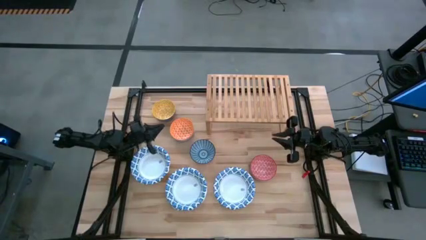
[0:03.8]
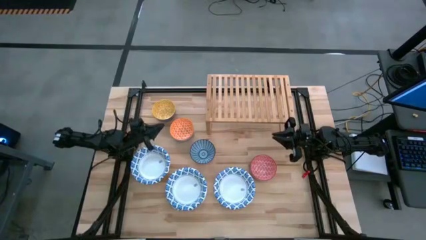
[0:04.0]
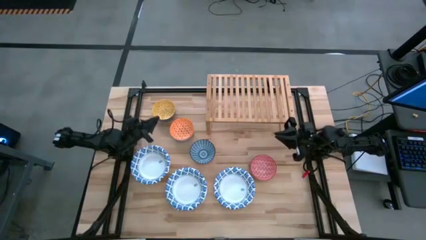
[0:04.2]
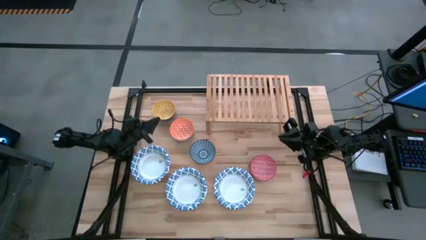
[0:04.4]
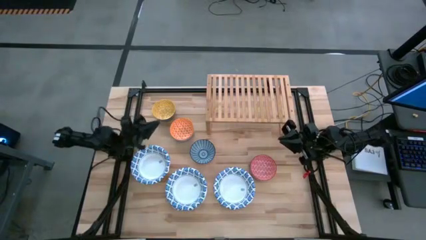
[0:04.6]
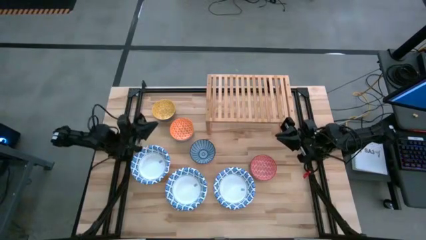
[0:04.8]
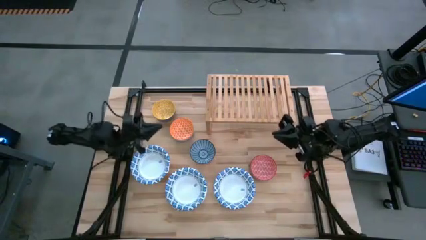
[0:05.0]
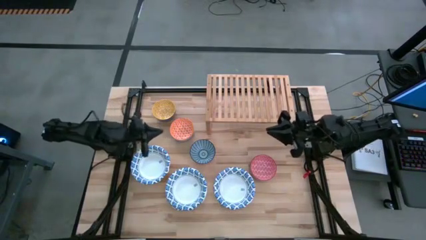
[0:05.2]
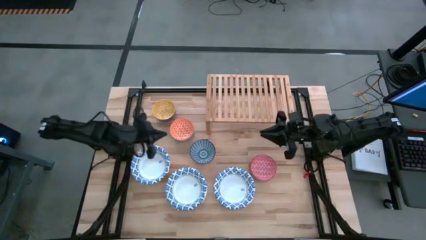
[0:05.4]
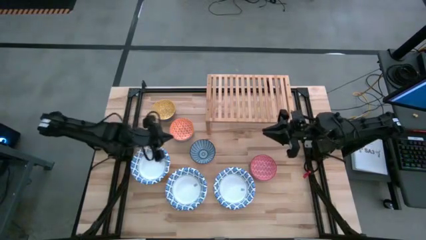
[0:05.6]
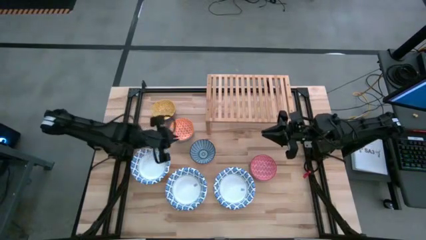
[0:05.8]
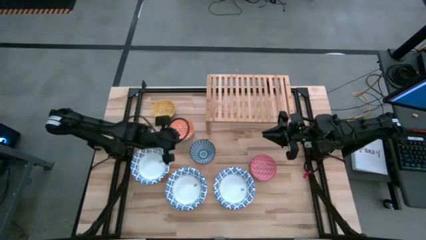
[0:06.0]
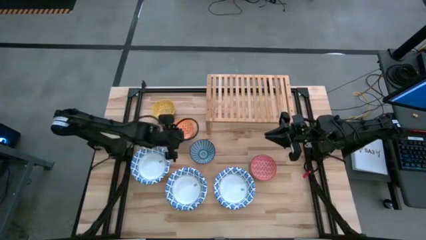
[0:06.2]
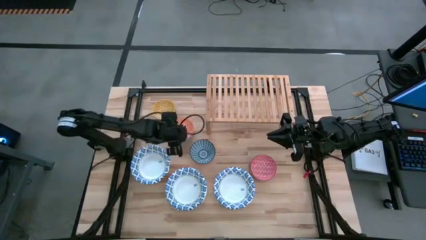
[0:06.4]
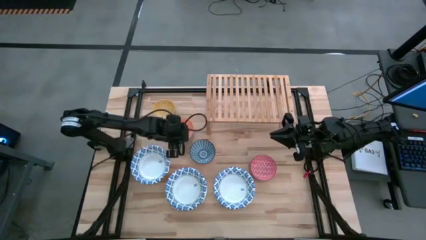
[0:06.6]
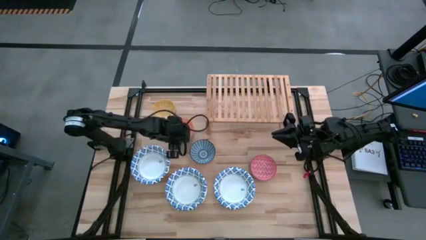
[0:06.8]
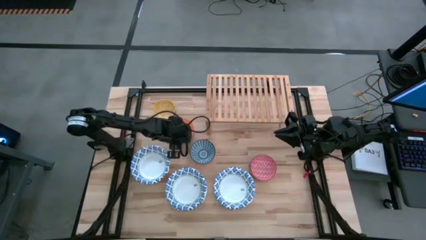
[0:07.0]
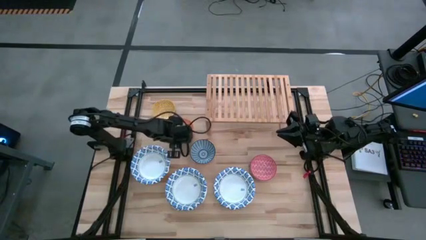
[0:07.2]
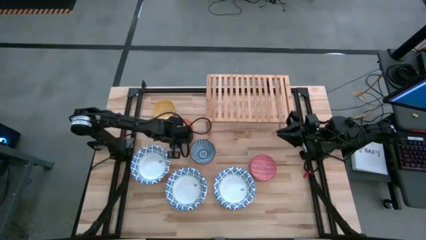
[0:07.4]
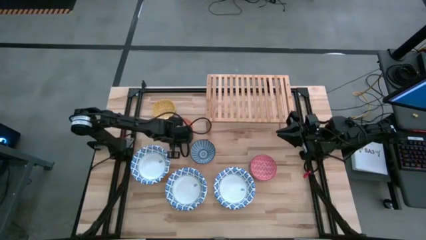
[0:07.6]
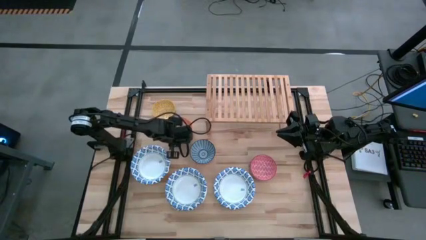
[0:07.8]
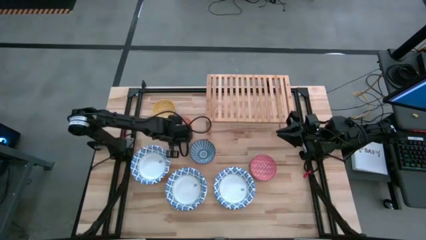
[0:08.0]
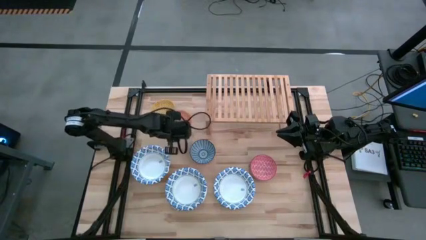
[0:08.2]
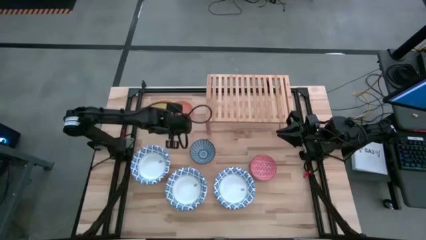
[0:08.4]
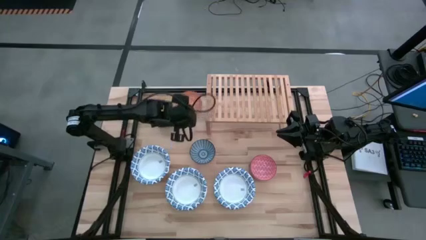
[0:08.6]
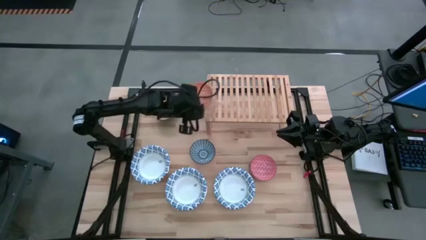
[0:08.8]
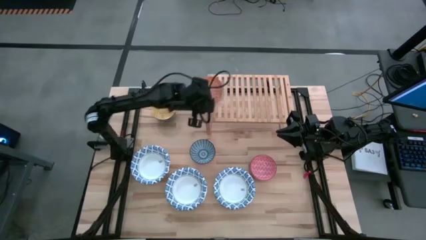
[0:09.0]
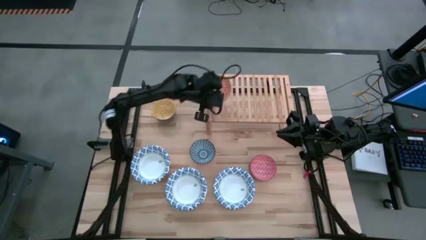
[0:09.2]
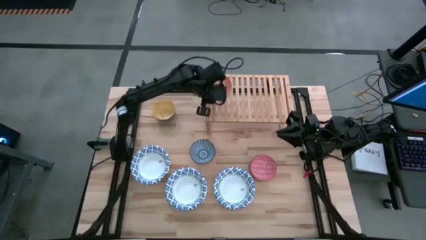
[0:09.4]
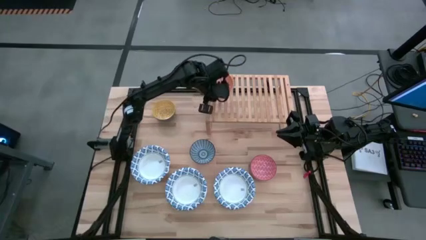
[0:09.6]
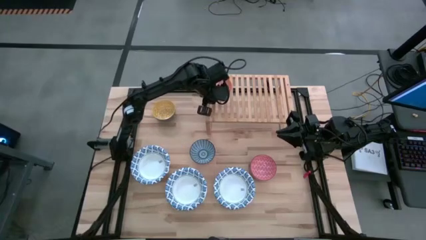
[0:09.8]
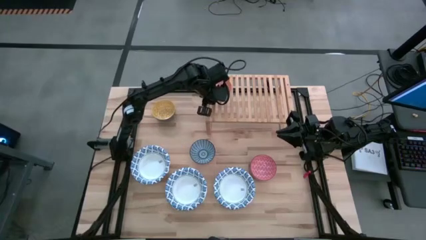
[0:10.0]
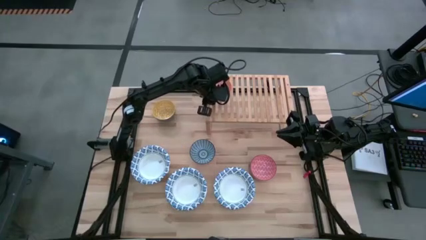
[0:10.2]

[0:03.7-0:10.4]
Task: Place and stack bowls onto a shelf
Put the orange patterned bowl on the shelf

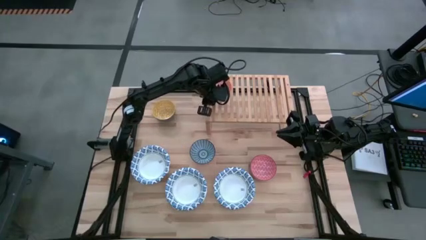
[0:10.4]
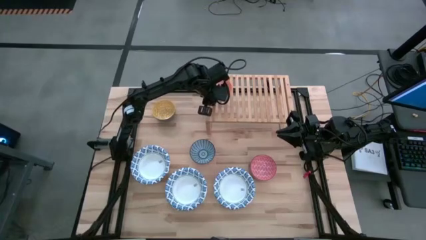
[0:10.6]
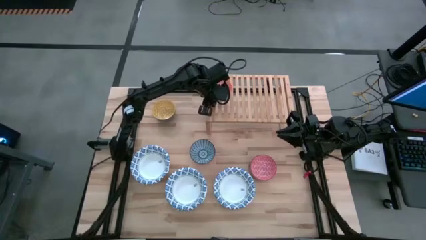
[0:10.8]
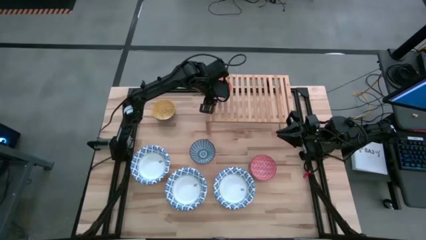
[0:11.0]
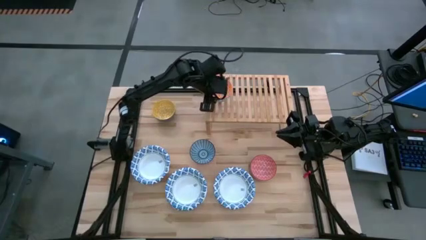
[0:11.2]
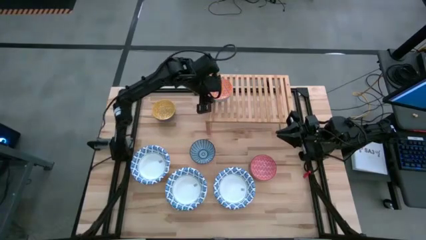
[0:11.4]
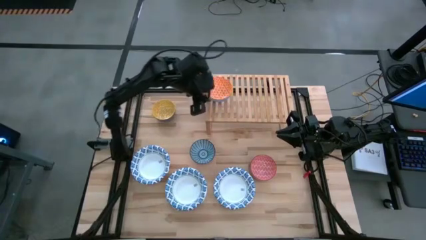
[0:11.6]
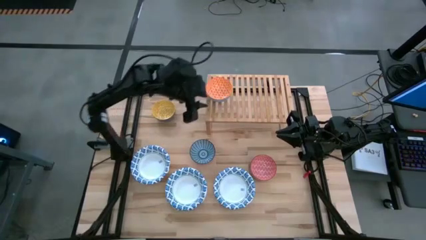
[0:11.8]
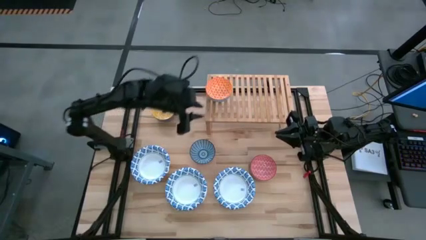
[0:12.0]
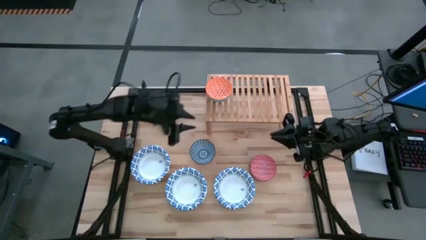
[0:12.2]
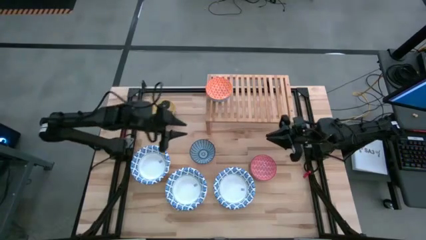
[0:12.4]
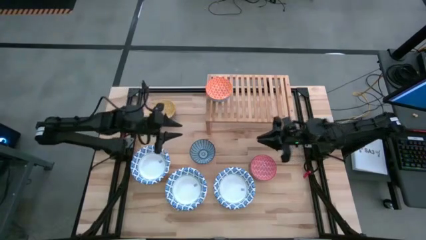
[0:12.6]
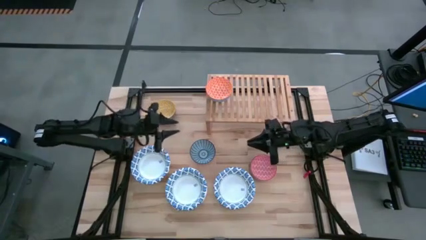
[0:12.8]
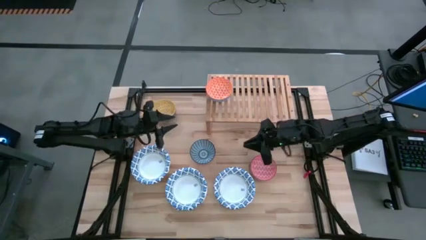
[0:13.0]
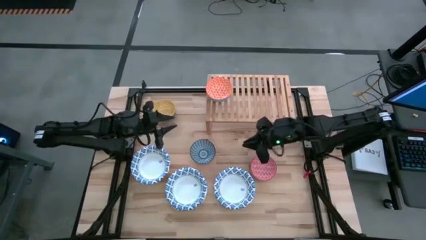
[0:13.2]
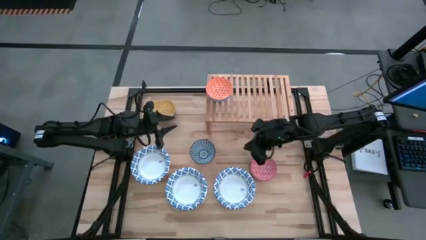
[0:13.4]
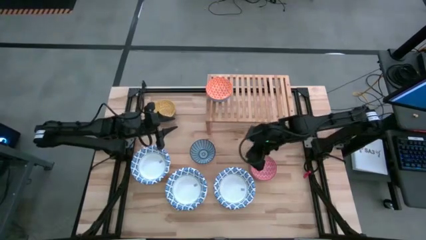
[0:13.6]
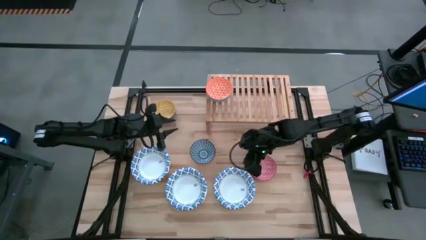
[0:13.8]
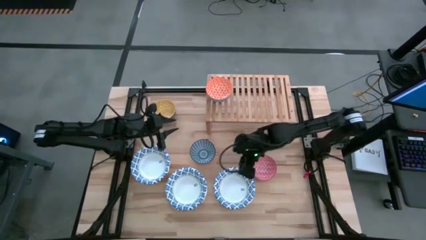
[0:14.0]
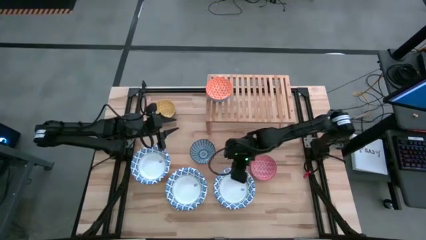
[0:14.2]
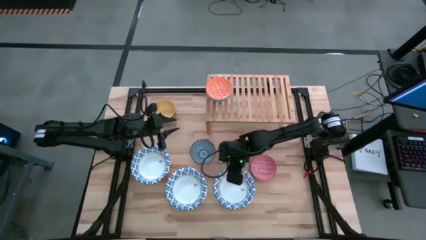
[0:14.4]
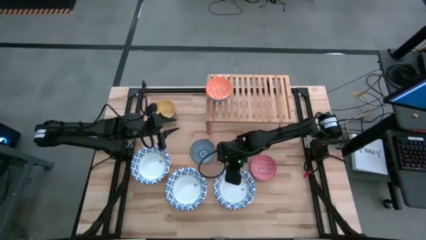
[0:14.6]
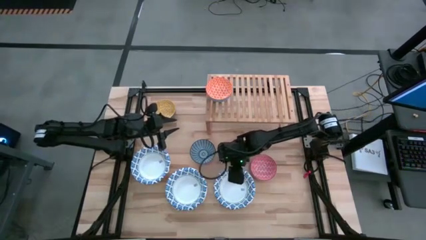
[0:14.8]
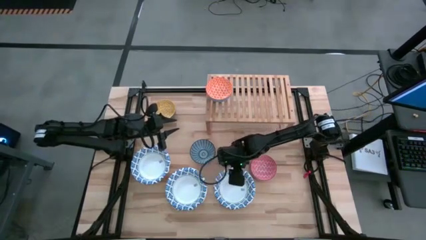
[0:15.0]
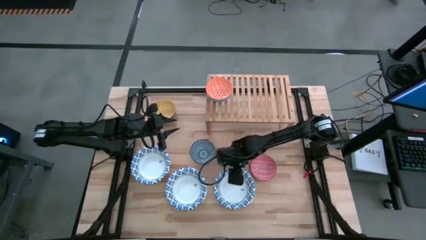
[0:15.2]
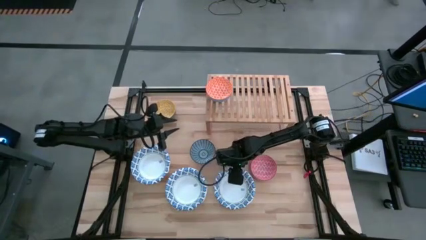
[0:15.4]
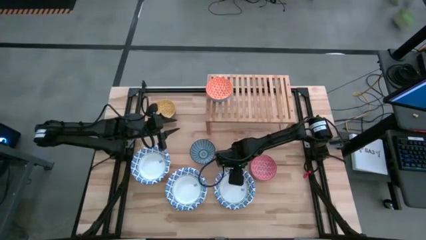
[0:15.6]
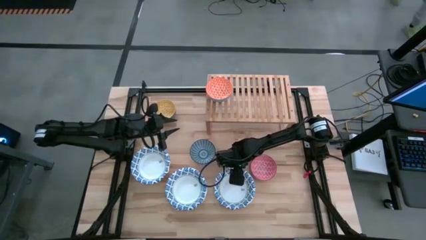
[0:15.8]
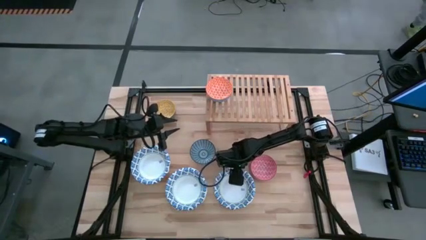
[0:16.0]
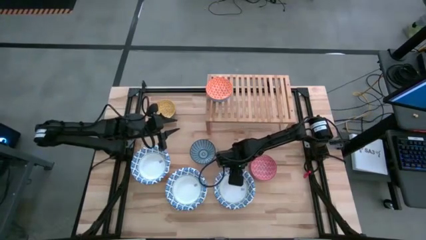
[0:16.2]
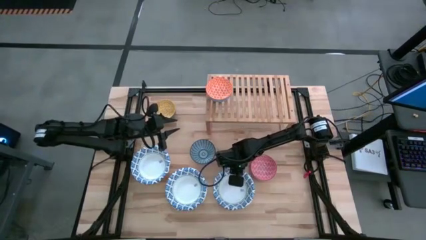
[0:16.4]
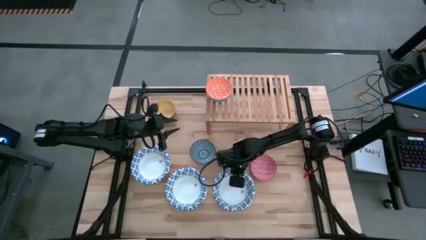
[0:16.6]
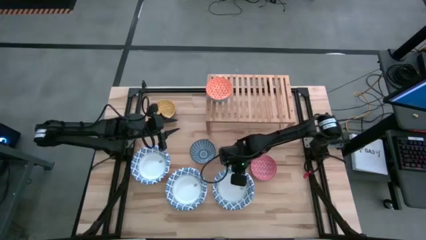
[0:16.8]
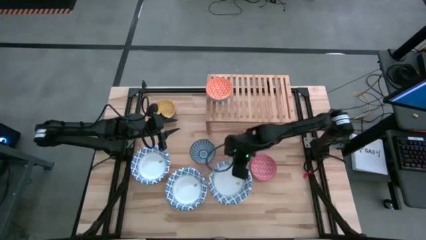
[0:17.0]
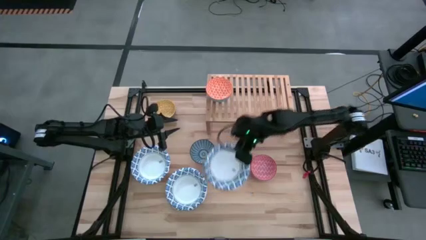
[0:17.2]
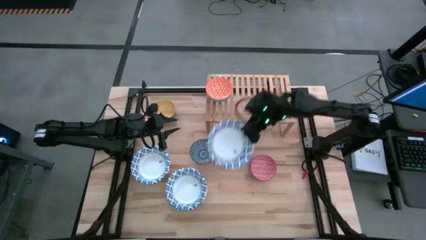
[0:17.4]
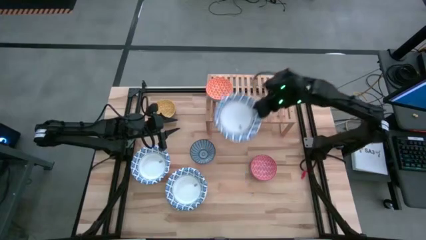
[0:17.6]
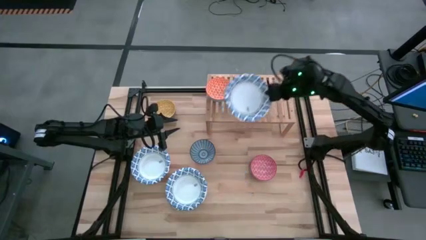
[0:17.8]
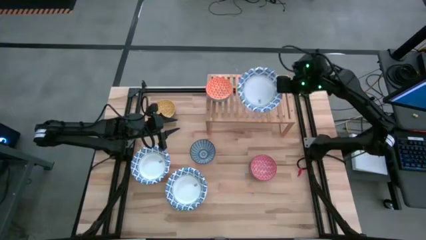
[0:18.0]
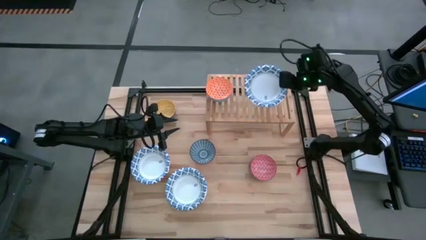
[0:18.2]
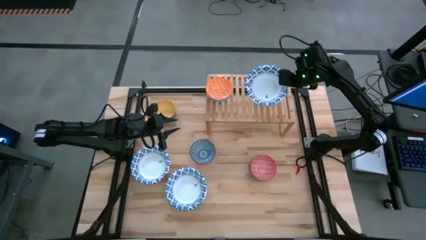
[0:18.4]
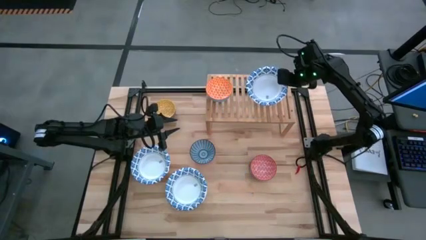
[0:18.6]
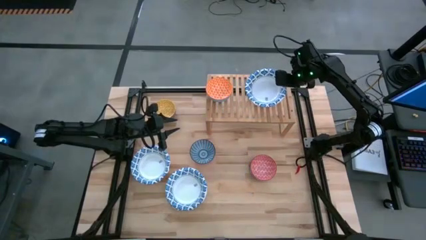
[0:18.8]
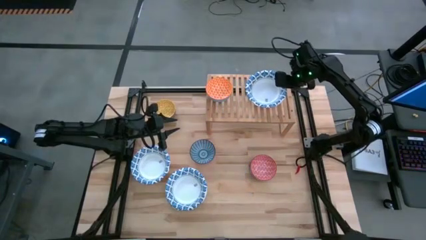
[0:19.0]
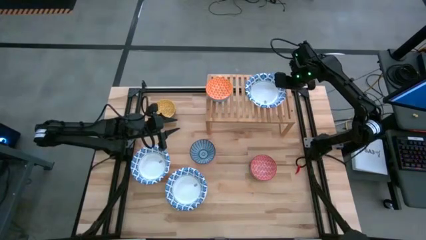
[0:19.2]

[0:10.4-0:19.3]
Put the white patterned bowl on the shelf

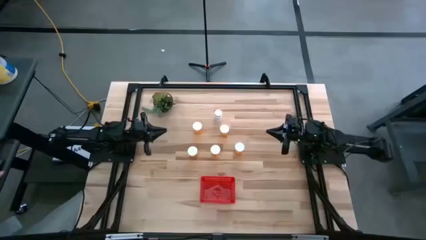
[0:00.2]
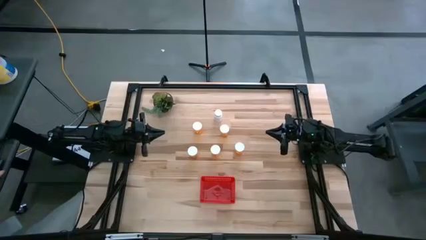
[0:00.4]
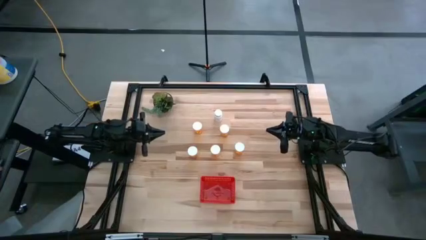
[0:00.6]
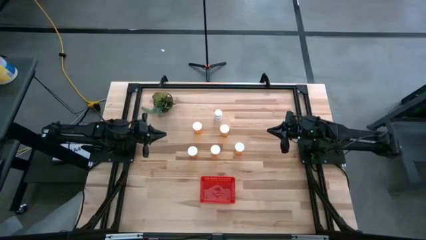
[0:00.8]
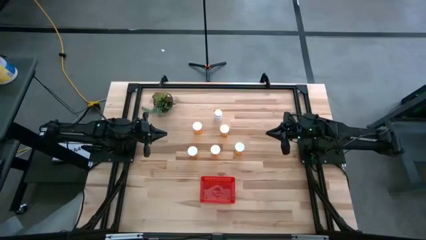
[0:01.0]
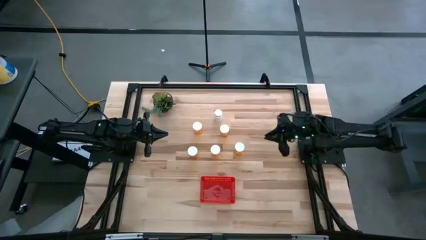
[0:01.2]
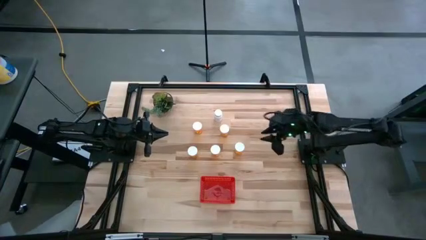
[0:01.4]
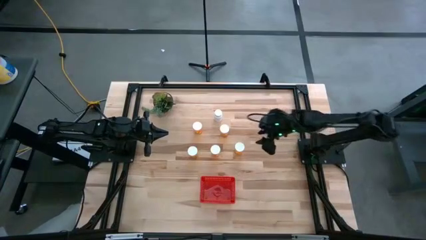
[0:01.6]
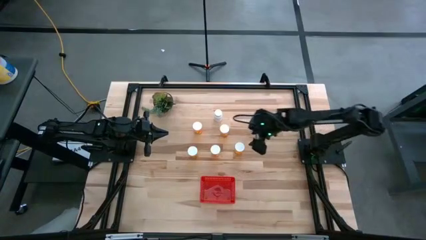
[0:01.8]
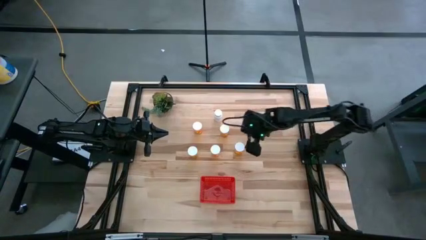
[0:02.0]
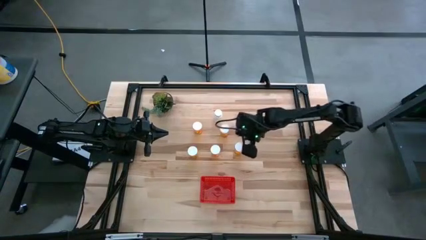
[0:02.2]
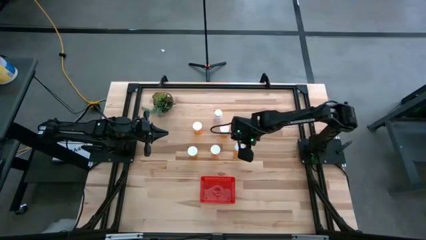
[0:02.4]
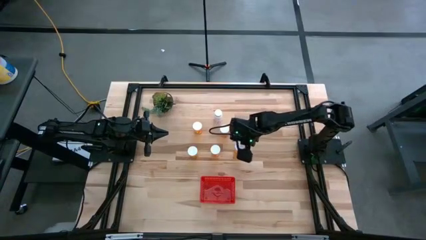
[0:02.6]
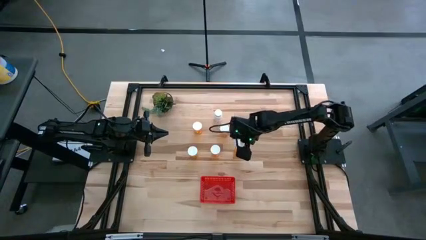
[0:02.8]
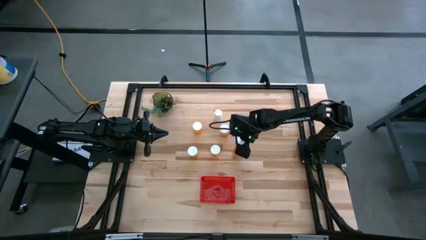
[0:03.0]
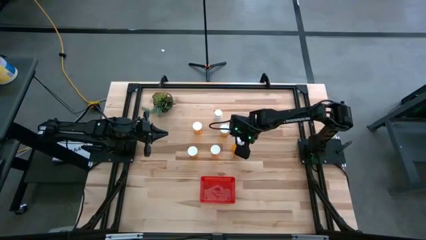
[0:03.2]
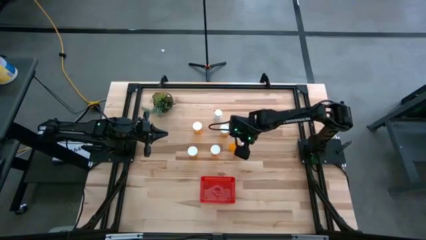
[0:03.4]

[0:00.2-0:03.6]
Task: Pick and place pill bottles into a basket
Put the orange pill bottle into the red bin
